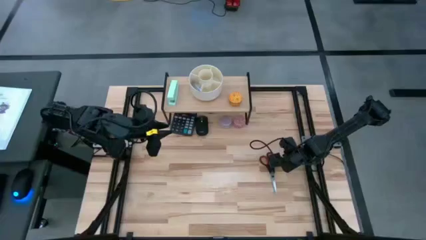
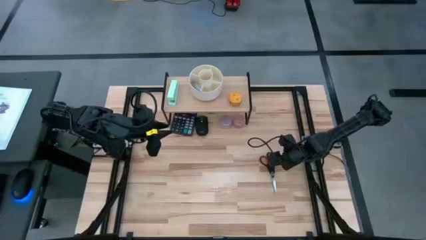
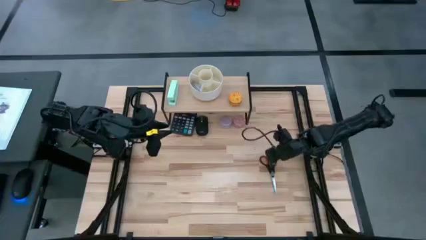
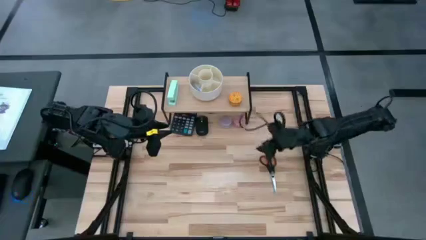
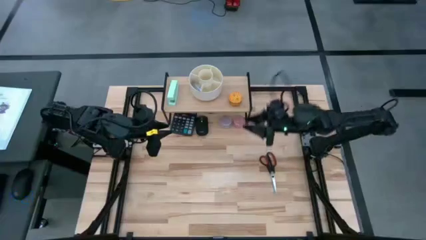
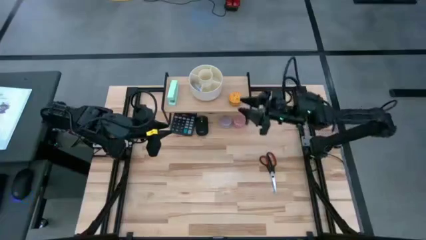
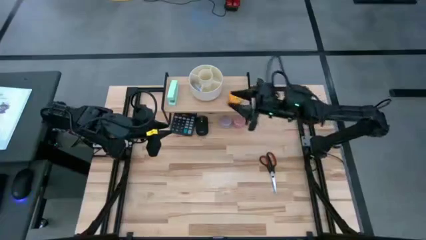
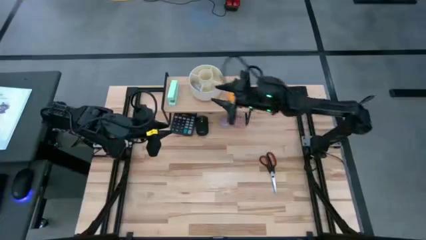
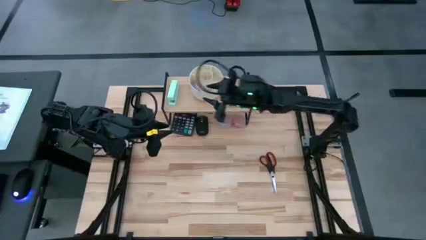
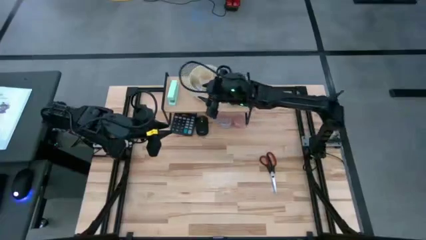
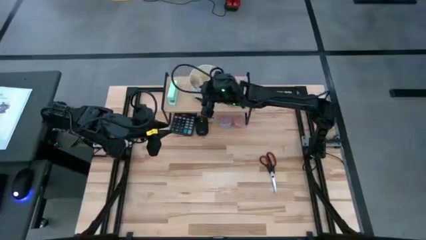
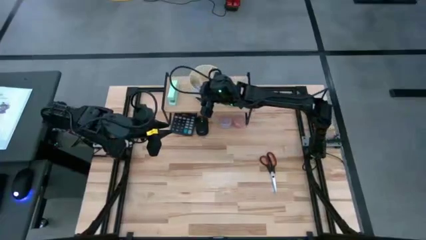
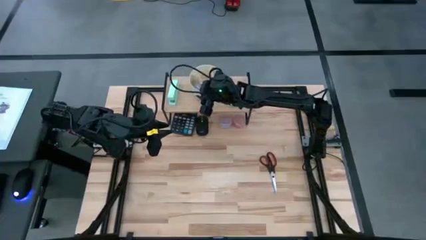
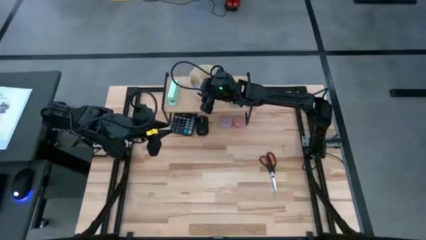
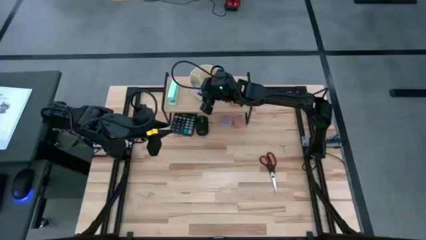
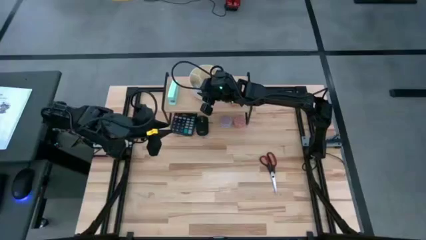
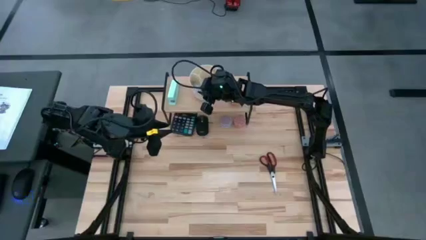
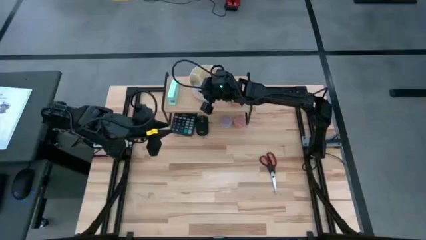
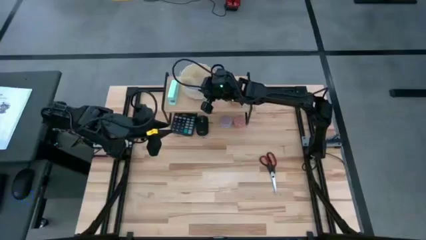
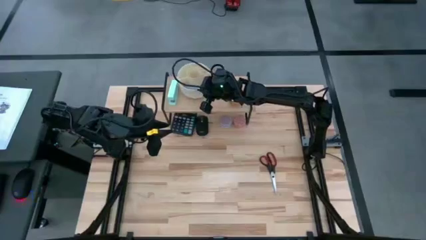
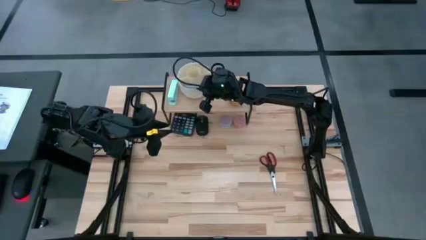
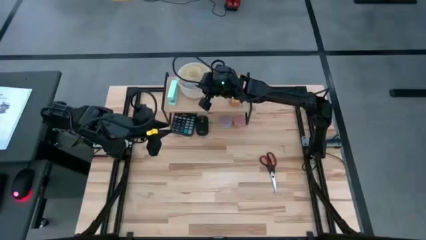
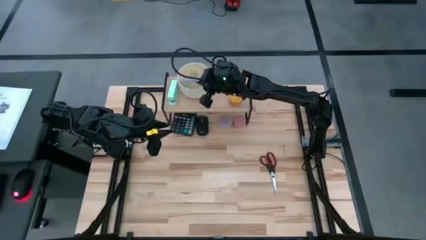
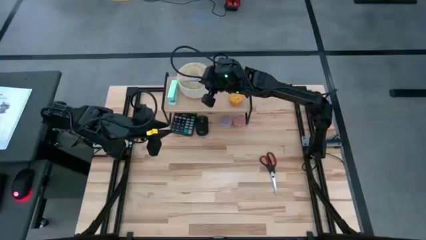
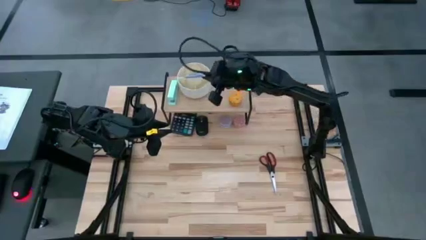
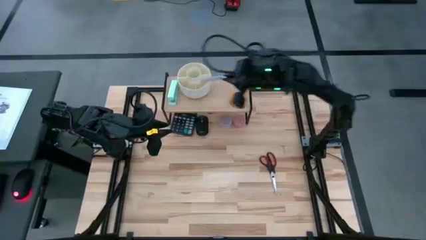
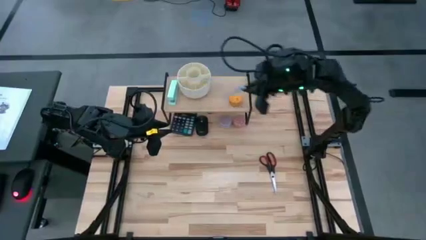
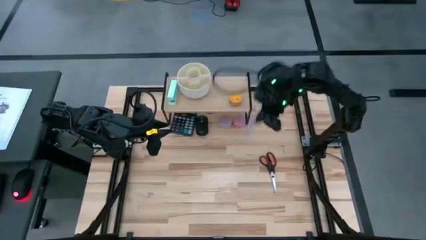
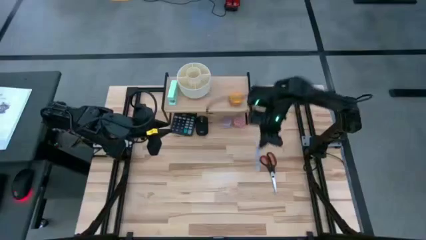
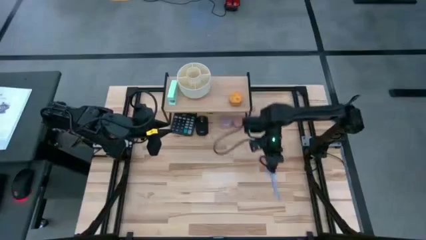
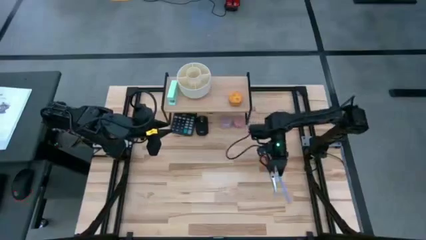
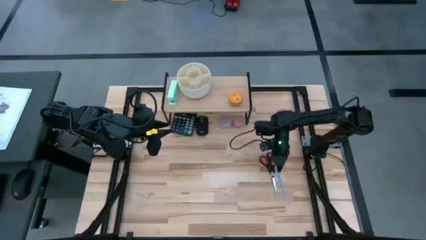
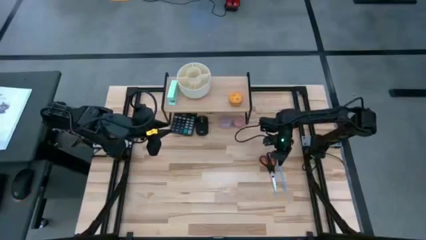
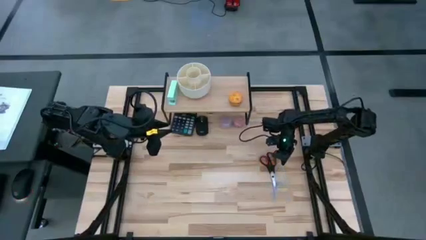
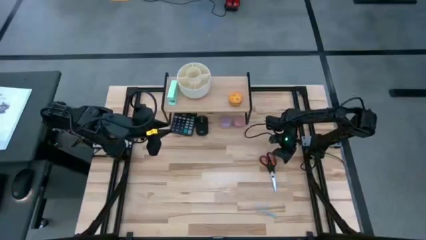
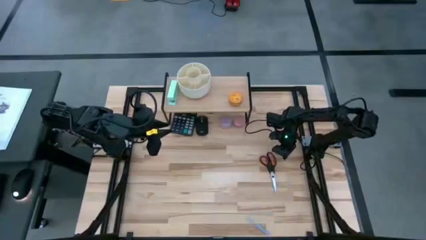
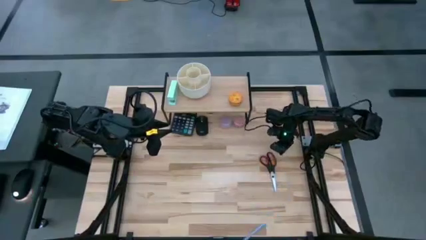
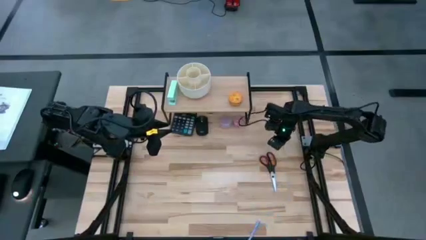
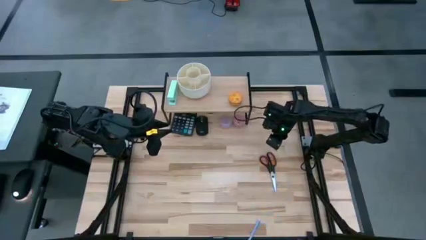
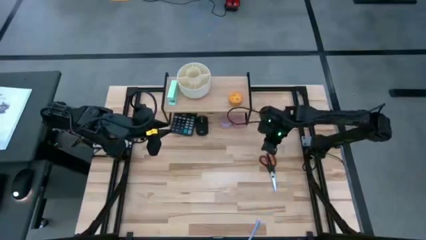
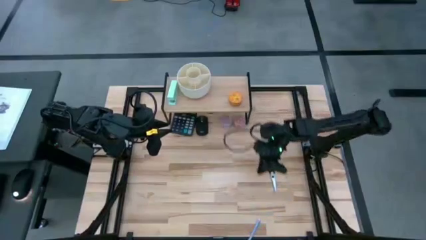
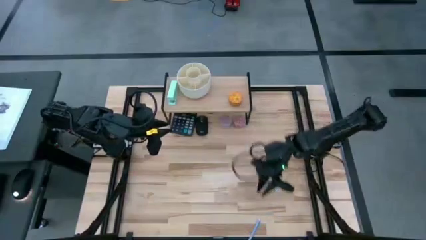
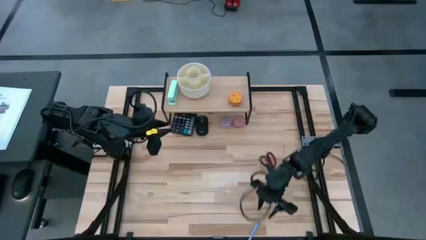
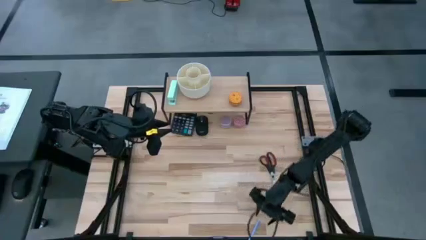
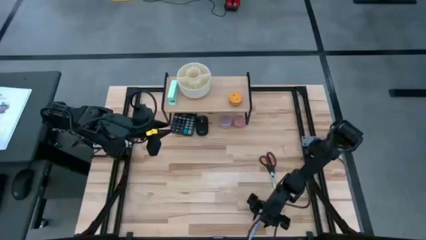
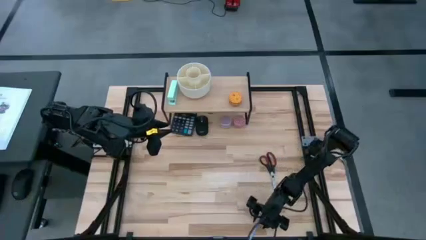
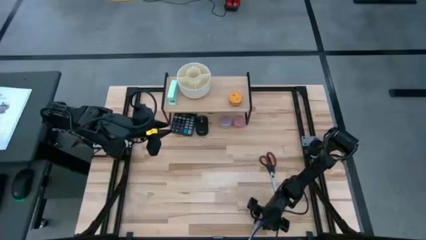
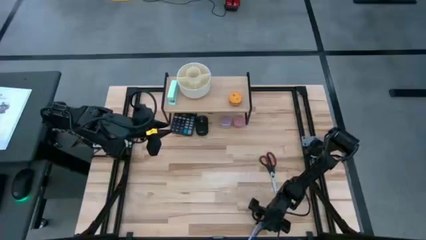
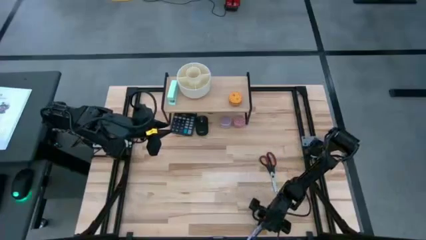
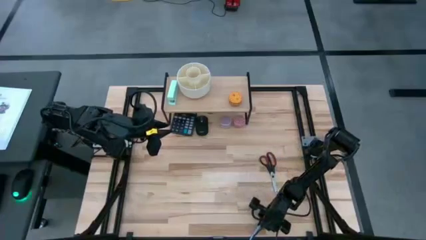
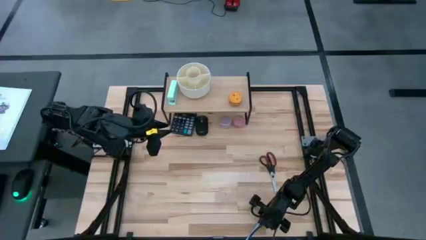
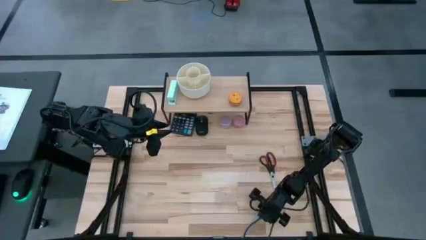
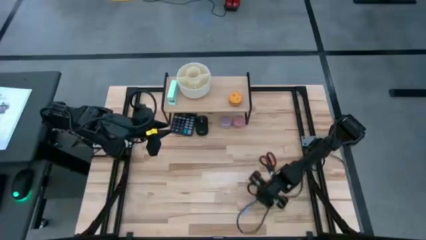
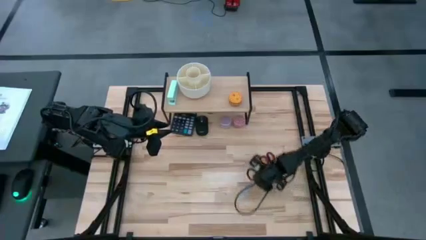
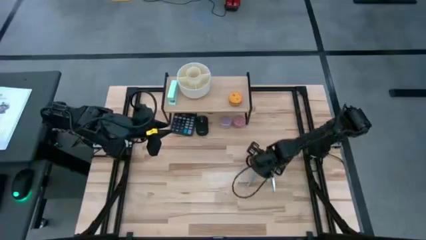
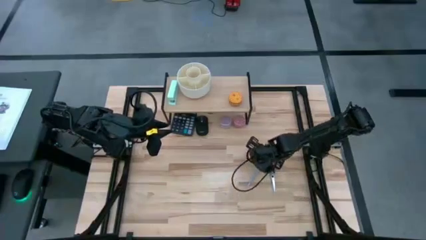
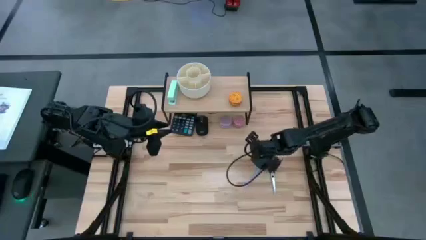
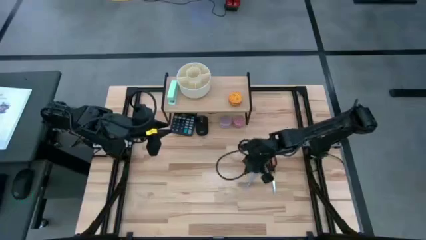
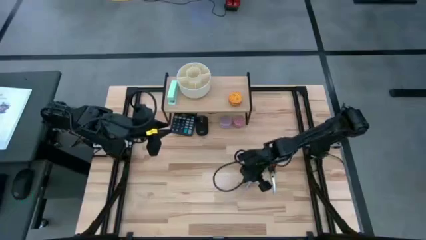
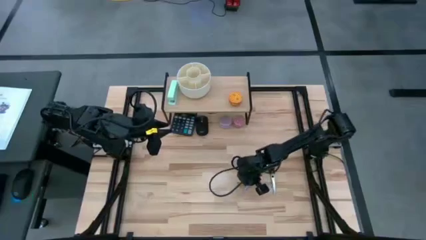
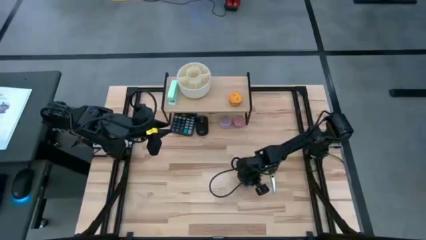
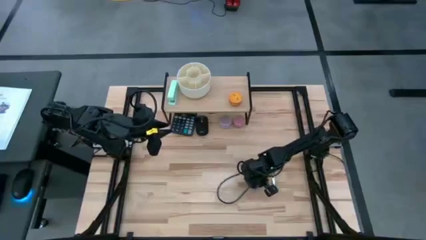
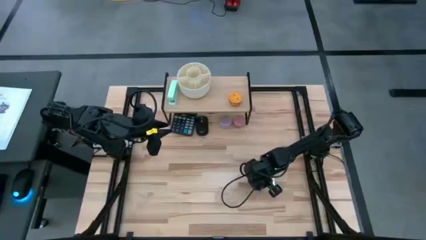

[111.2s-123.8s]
Task: Stock shelves
Remove the gray pen from the white desk organizer

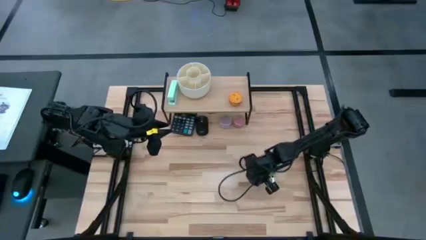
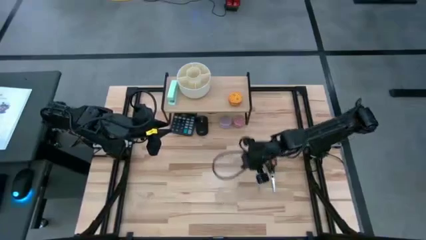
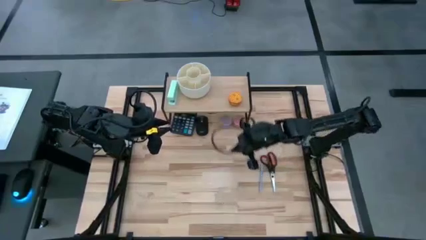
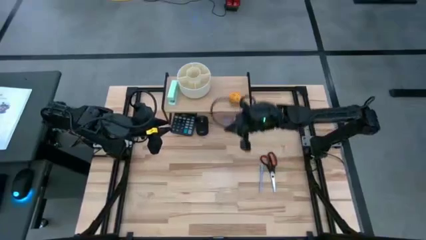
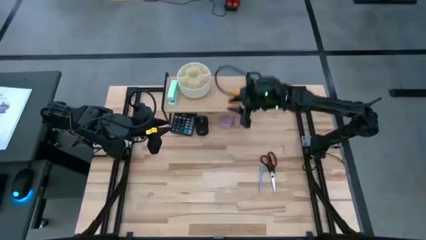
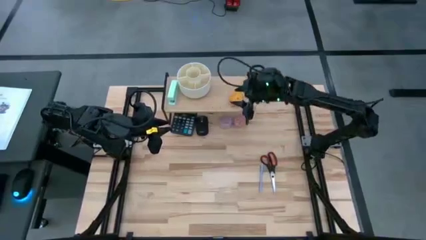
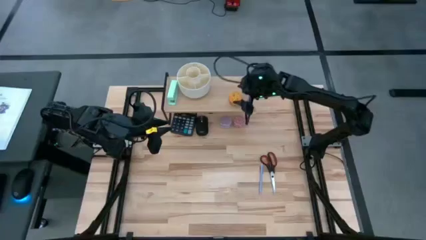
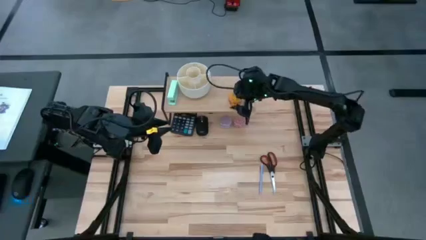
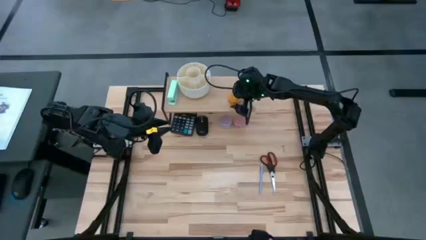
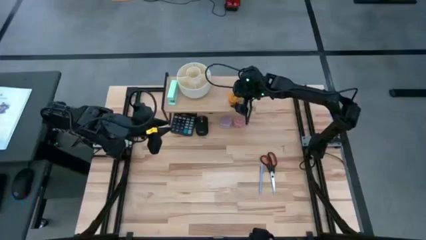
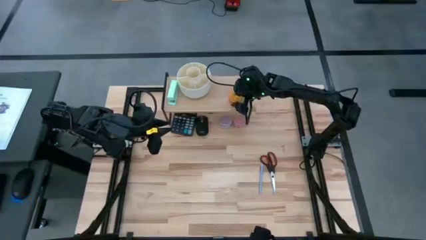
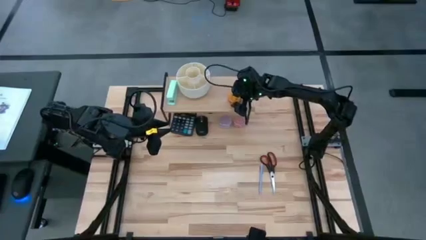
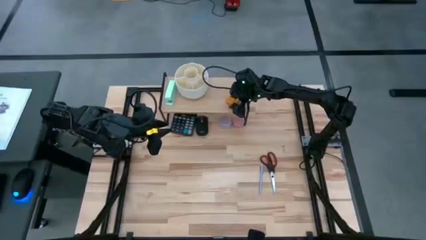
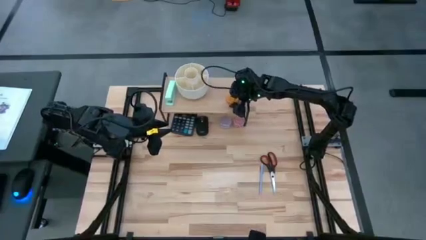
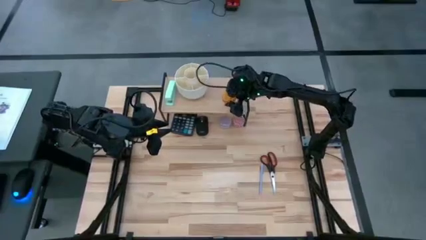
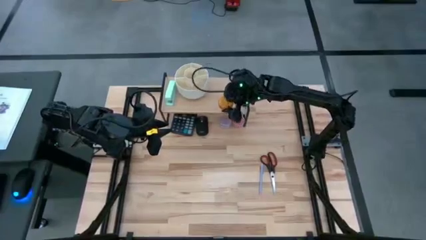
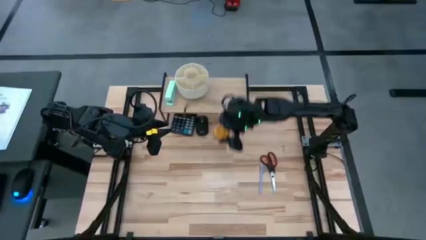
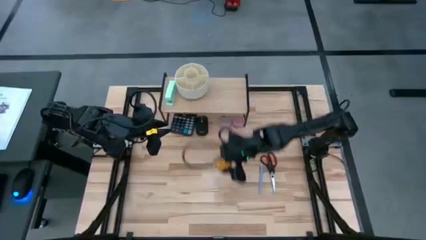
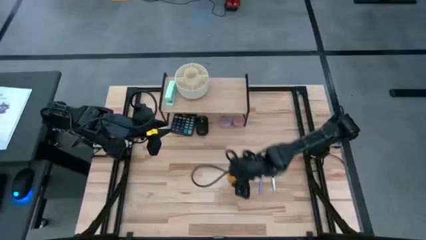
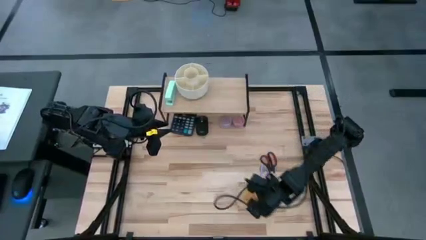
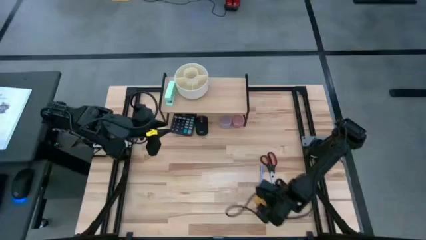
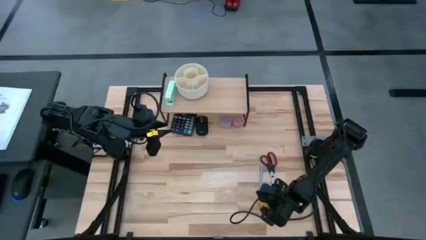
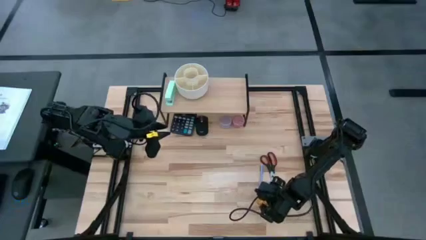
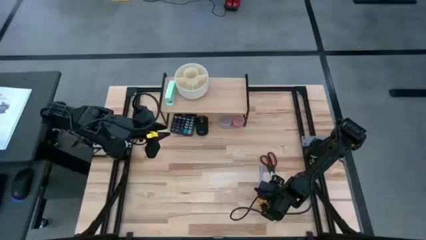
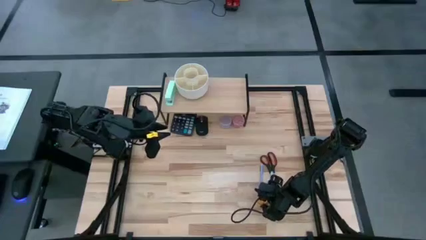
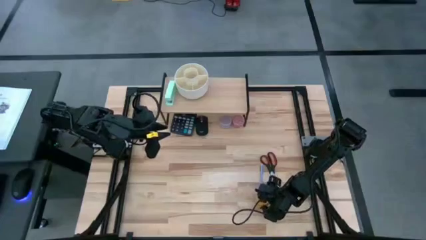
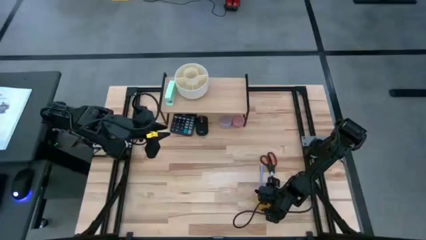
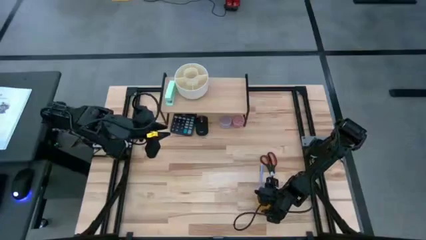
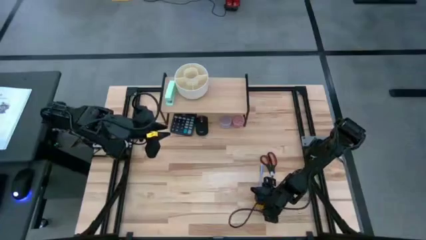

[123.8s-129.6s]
Remove the orange scented candle from the shelf
